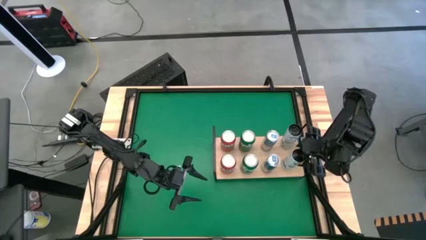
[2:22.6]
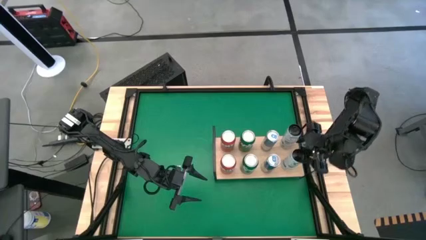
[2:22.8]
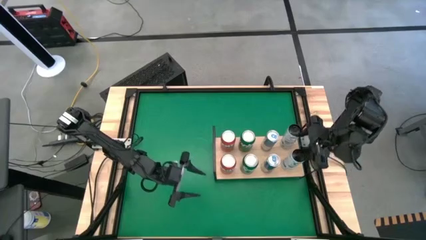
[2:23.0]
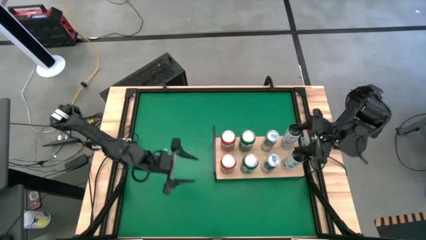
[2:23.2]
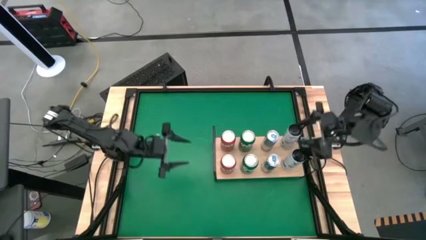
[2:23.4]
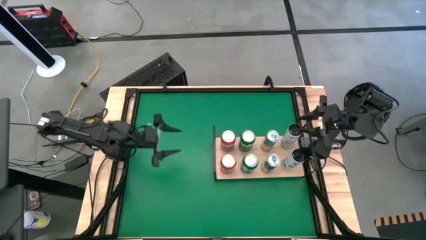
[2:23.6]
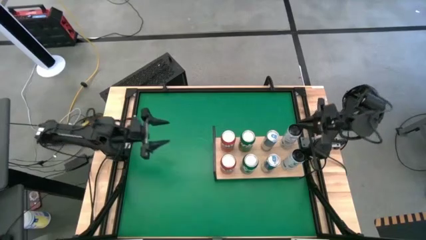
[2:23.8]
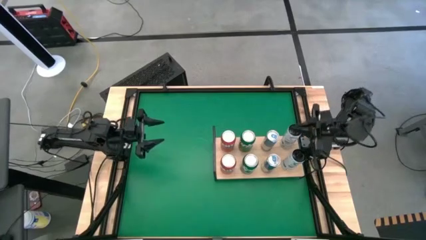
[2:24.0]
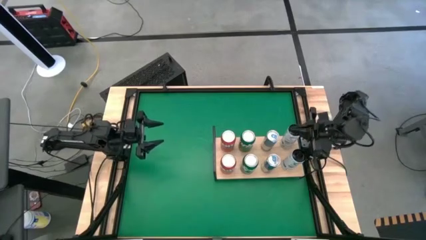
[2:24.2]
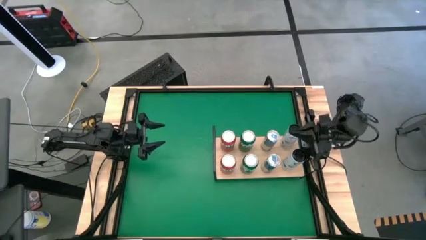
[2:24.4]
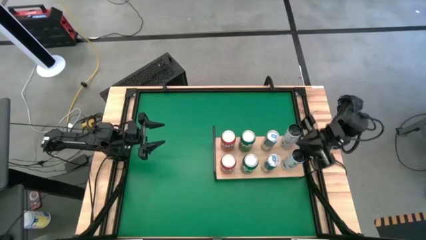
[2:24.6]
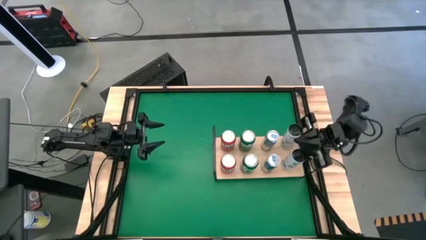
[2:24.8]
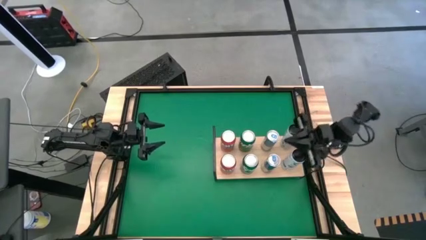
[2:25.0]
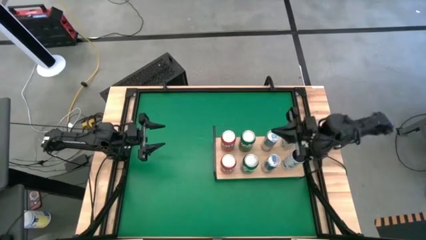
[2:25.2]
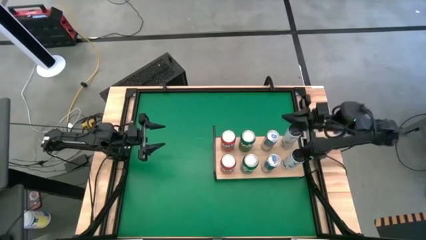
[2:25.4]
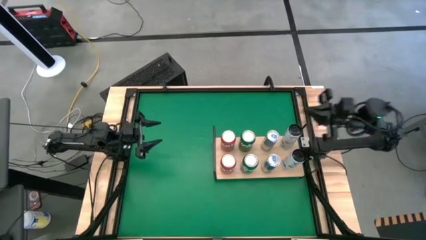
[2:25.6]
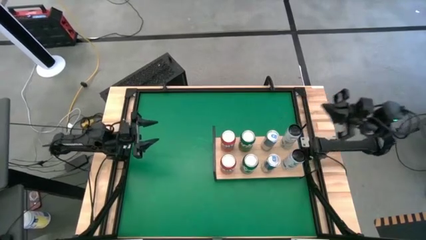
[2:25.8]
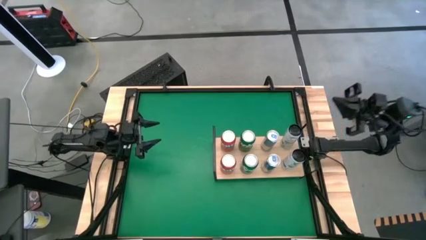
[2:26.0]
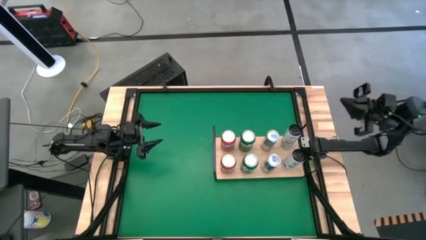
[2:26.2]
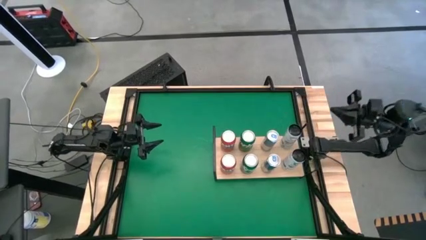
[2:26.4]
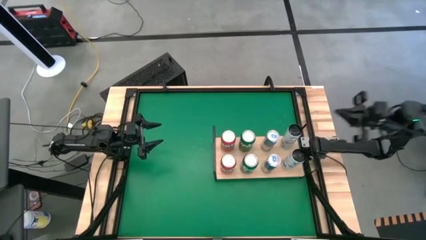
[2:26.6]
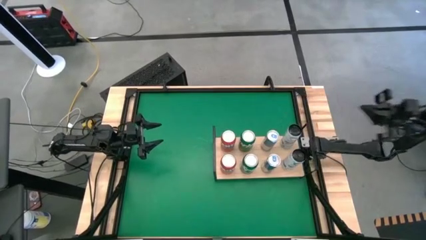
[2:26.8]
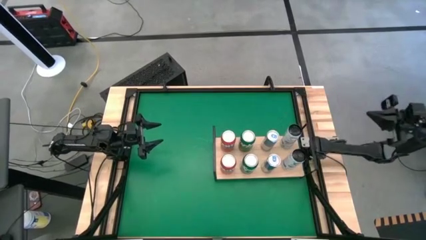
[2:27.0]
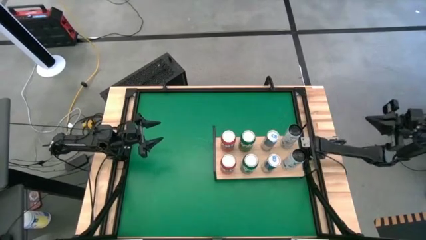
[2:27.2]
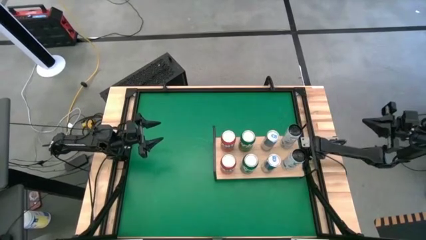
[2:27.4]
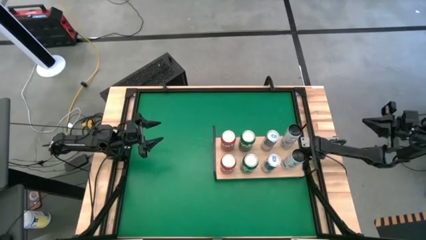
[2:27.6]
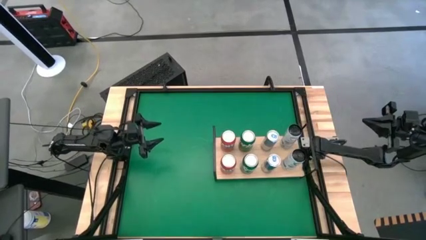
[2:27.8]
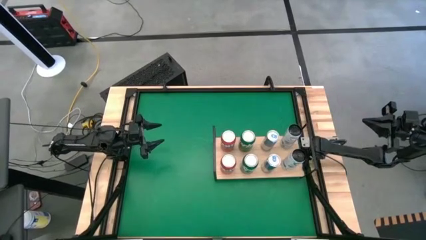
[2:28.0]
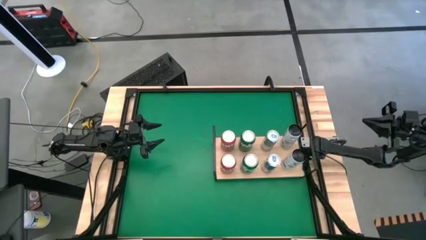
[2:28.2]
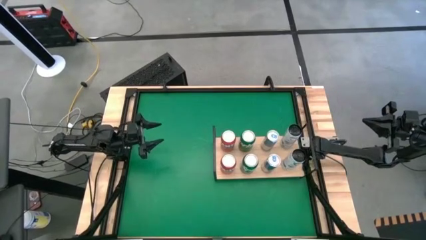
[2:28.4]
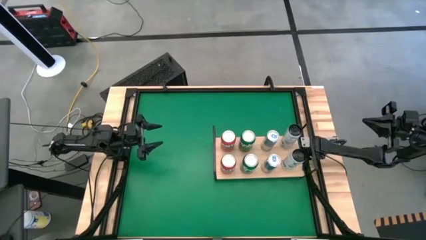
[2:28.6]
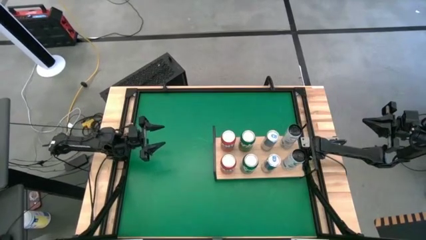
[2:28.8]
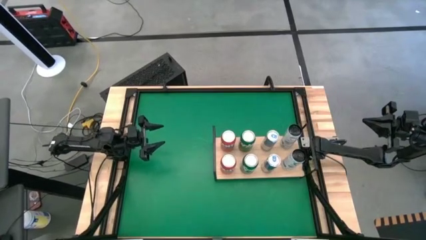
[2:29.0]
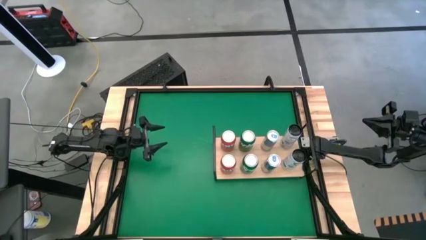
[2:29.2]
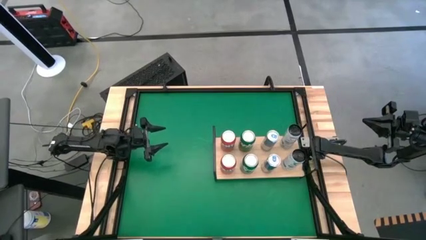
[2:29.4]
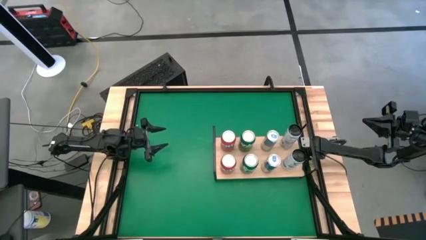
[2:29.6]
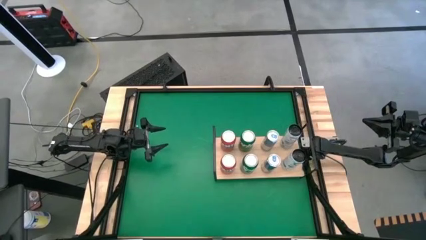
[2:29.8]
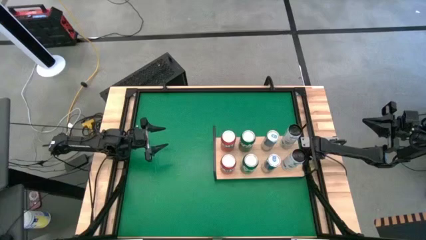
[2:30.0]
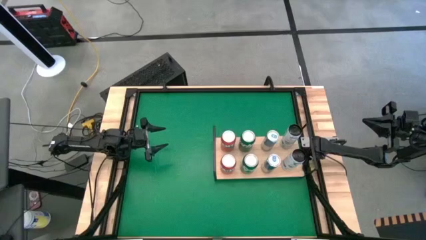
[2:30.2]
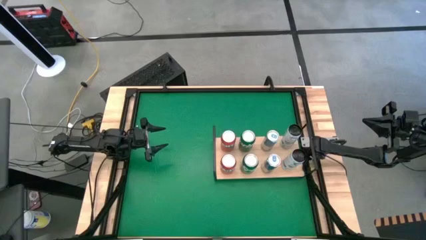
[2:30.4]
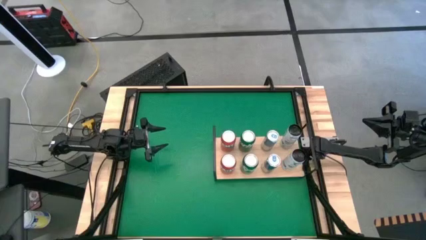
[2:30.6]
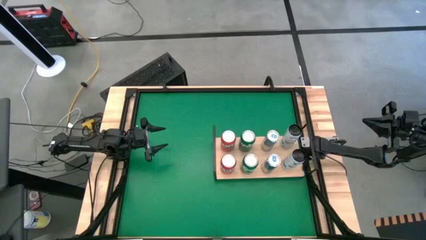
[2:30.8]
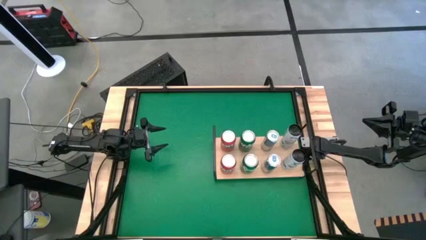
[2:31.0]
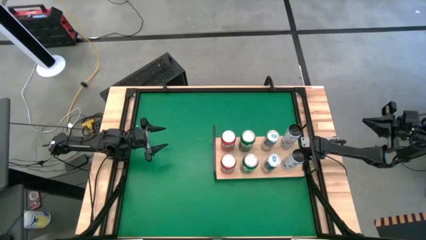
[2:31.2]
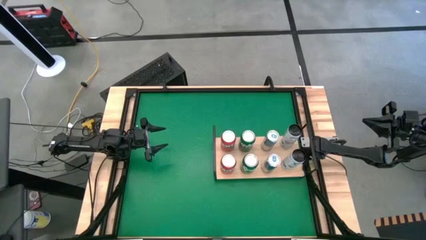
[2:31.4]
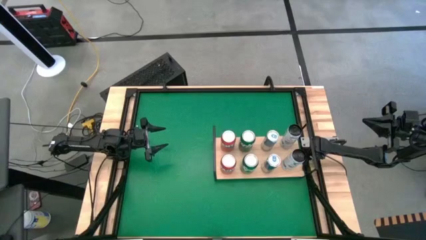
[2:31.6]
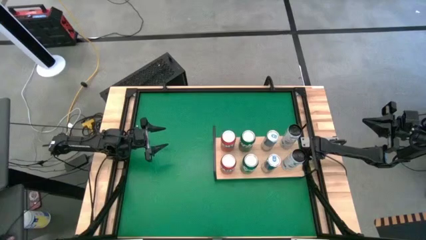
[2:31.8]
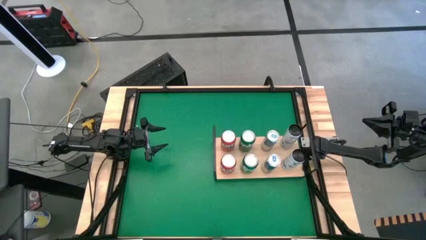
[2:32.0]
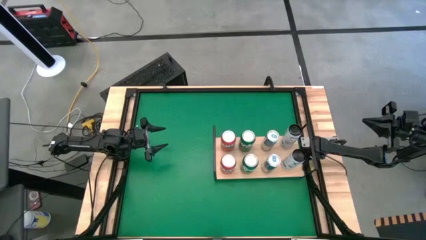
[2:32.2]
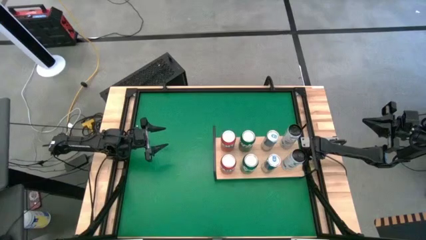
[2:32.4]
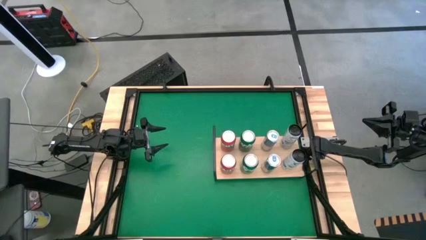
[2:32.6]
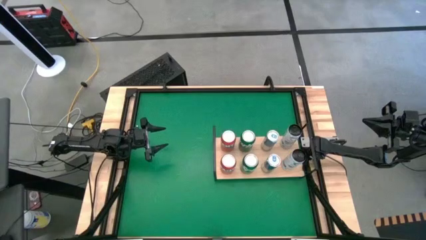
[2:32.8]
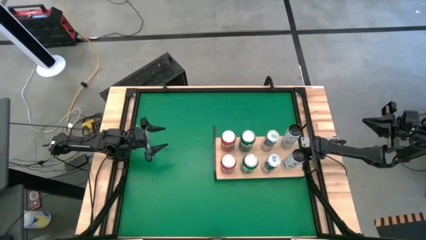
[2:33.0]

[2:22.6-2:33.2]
Task: Place canned beverage on shelf
Return to Home Position

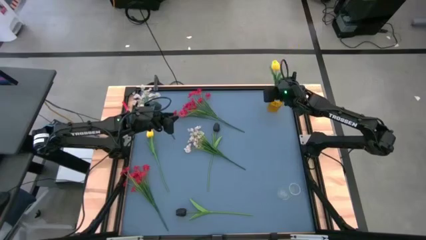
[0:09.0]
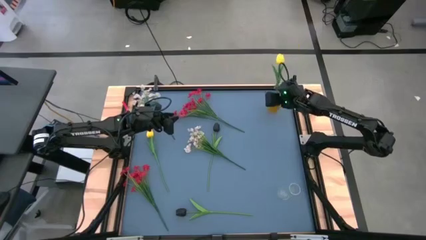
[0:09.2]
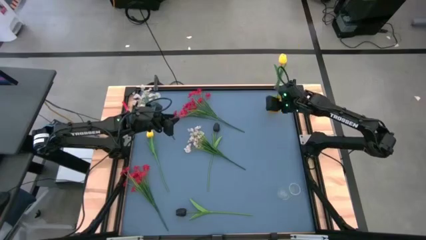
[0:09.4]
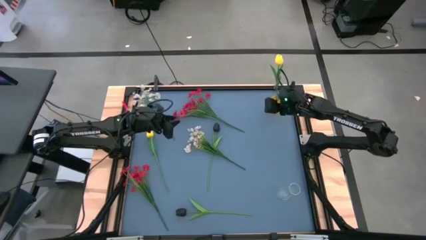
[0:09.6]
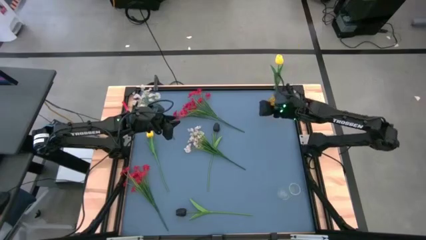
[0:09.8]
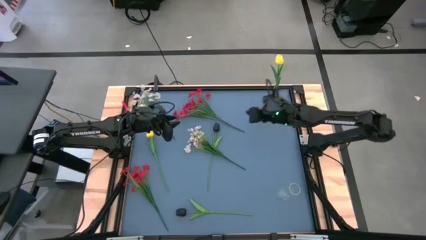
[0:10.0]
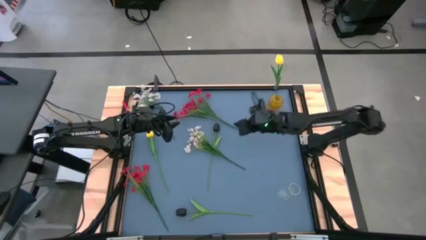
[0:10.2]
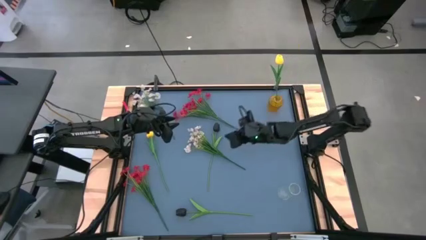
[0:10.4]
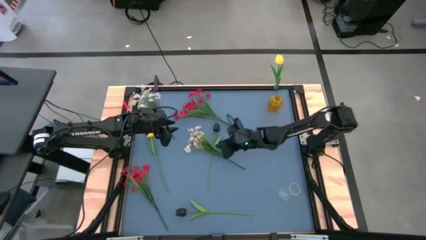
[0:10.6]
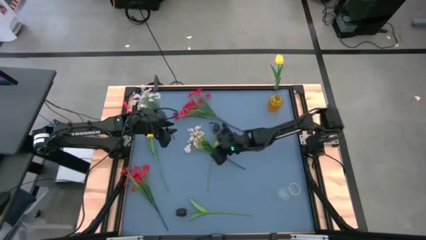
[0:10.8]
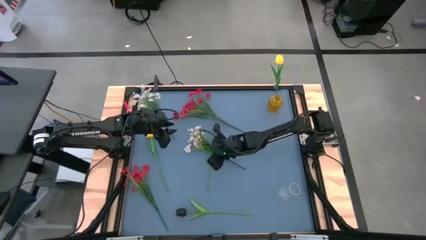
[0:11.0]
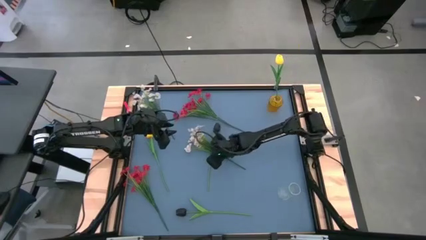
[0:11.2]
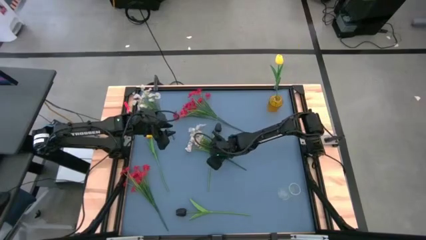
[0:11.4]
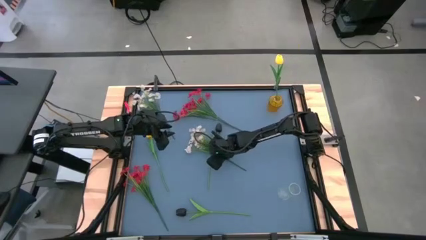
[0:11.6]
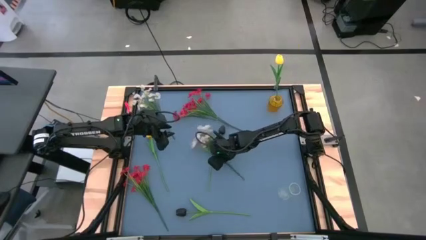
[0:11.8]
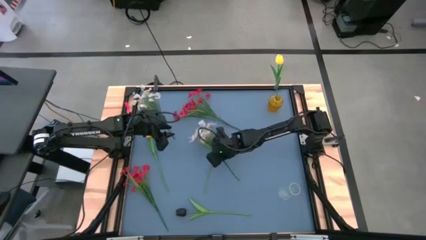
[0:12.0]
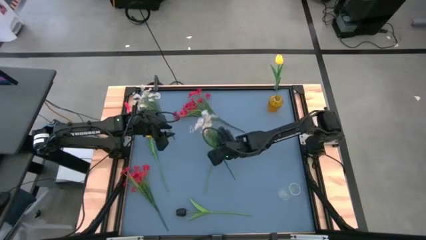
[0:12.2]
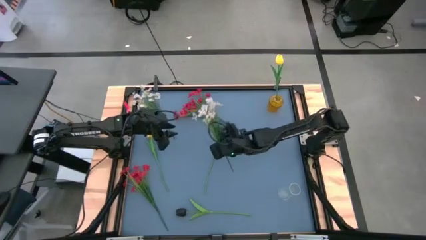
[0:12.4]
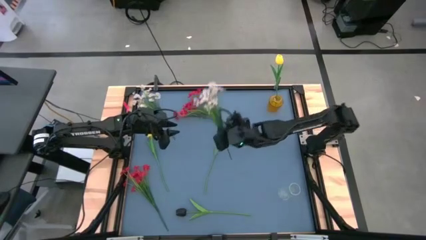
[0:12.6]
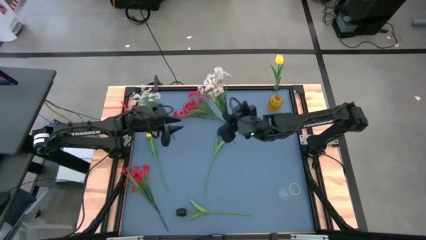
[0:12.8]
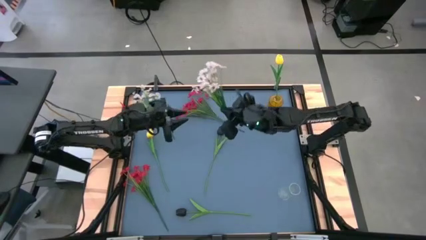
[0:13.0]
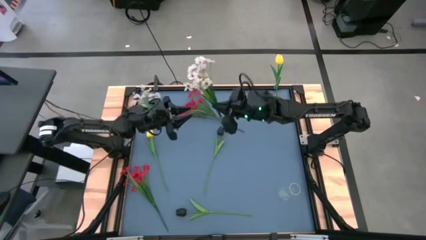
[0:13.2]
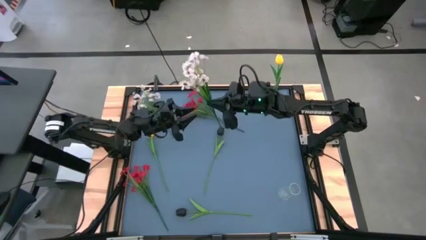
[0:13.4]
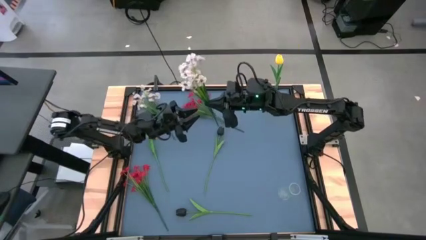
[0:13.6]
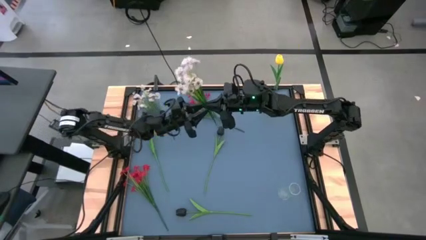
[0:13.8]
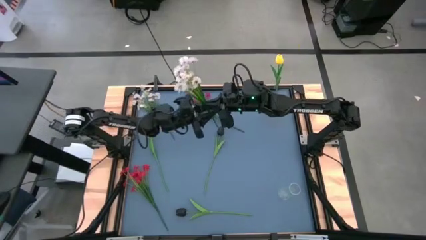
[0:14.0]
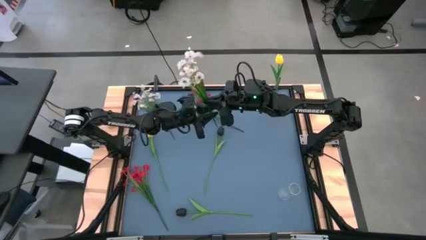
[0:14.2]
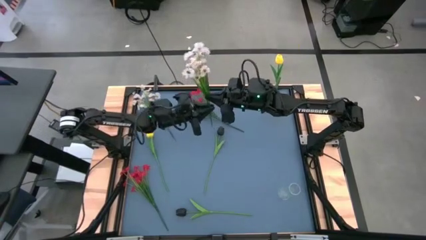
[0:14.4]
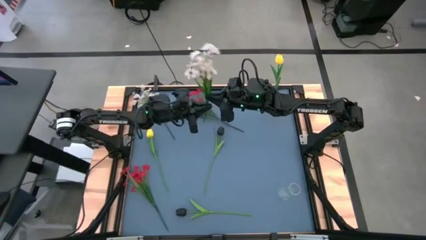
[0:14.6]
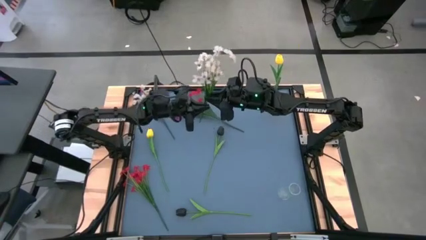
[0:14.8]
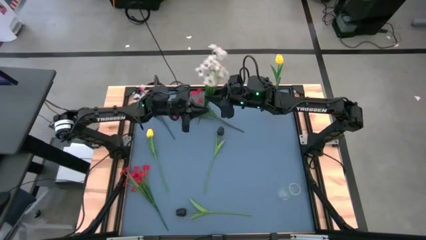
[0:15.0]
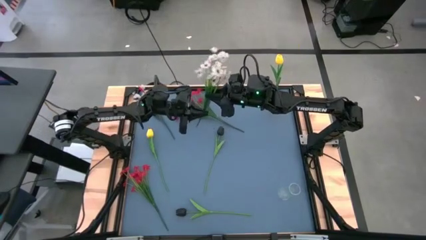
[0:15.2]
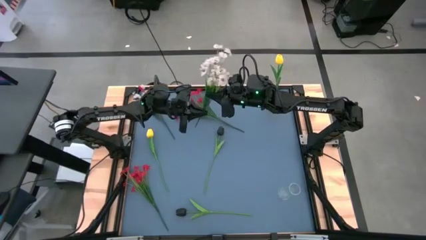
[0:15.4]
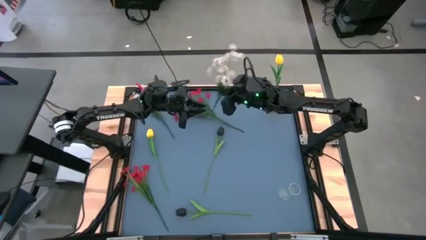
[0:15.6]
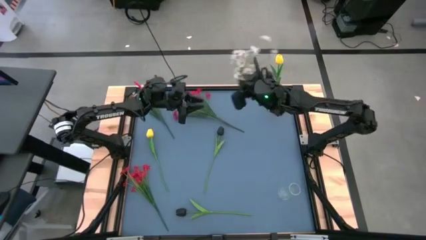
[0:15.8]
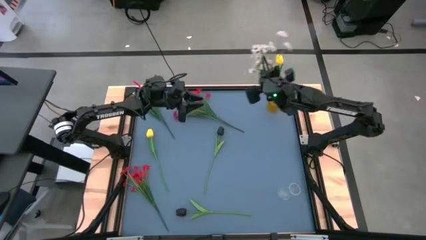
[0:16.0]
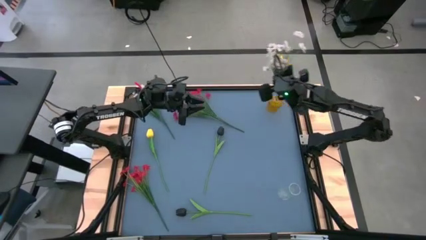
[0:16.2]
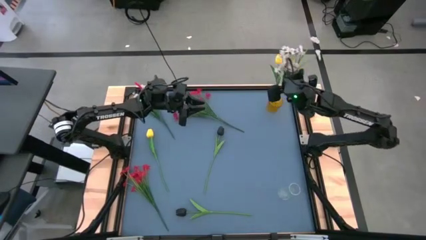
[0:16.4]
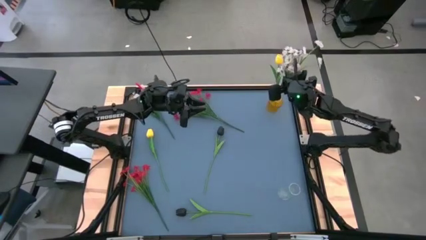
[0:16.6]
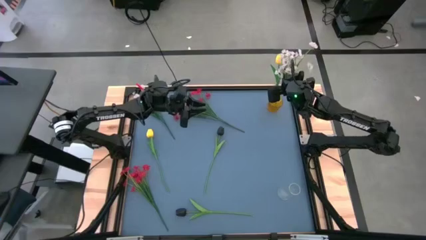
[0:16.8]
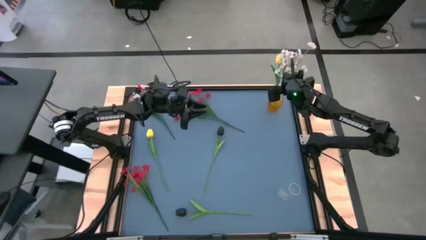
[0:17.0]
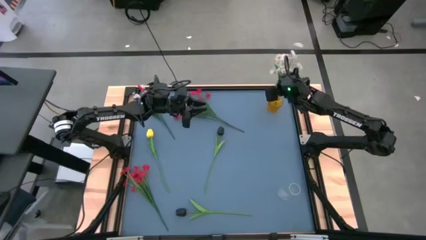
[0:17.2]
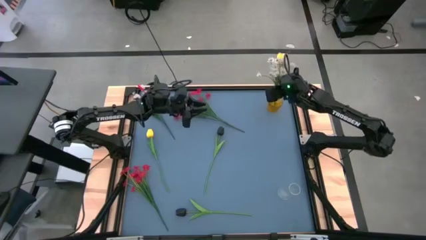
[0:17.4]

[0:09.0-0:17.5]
Task: Sort flowers into vase by color
Put the right white flowers into the yellow vase
